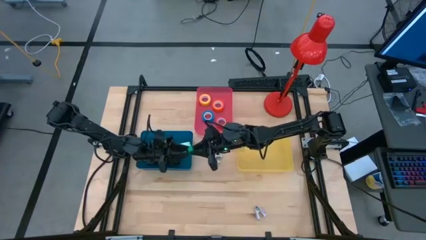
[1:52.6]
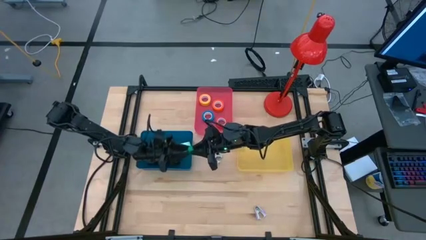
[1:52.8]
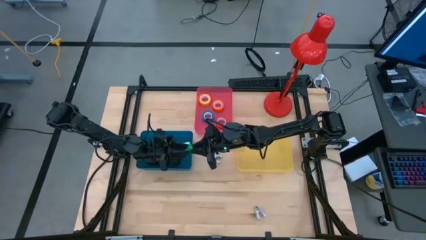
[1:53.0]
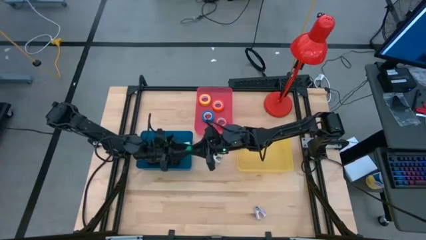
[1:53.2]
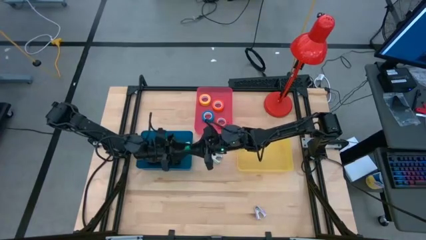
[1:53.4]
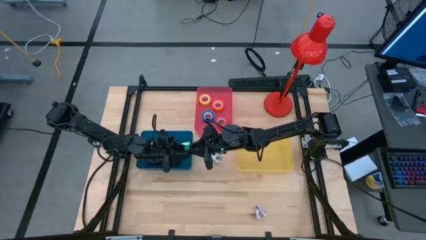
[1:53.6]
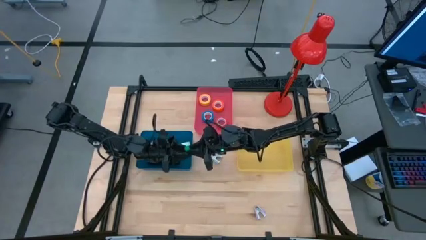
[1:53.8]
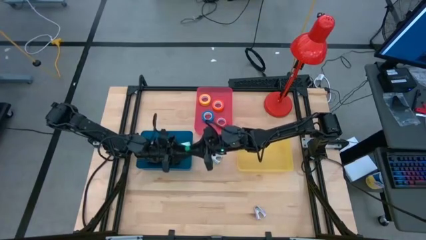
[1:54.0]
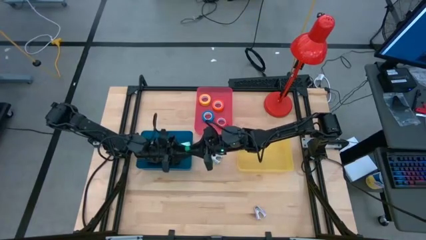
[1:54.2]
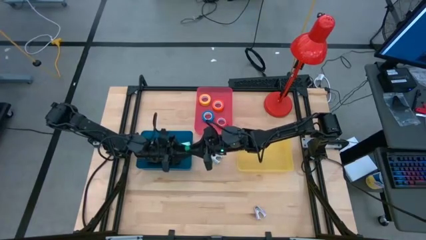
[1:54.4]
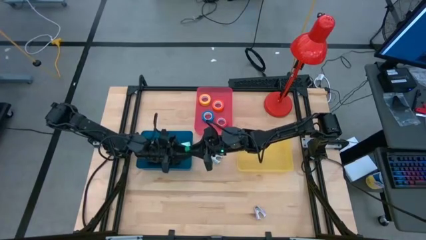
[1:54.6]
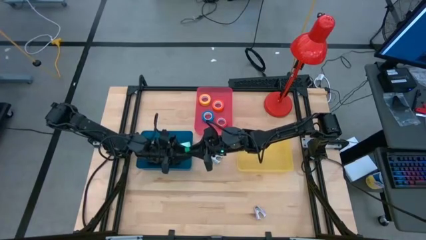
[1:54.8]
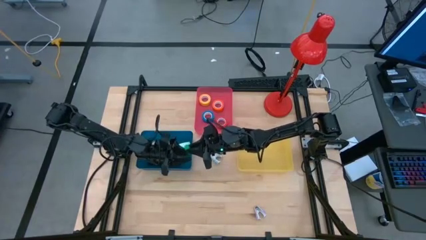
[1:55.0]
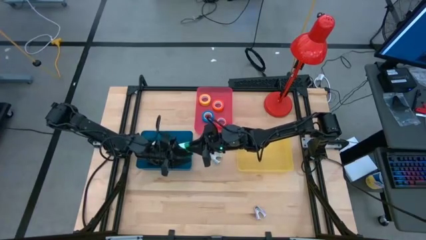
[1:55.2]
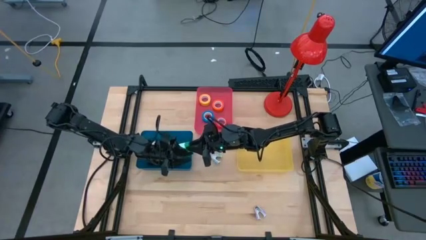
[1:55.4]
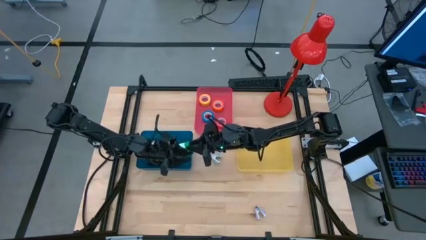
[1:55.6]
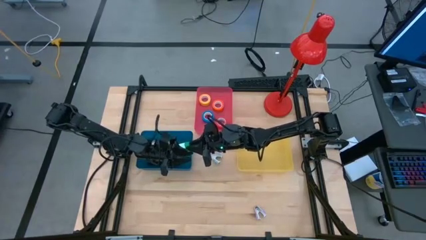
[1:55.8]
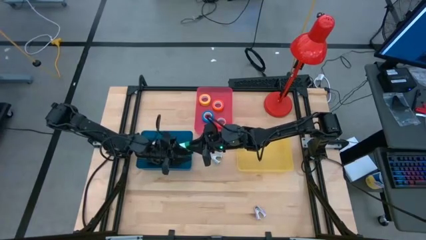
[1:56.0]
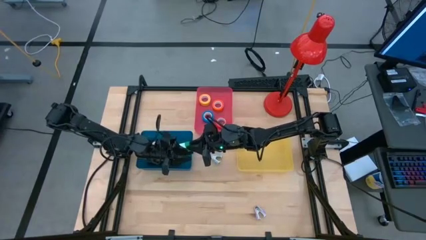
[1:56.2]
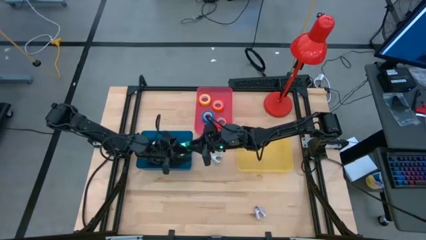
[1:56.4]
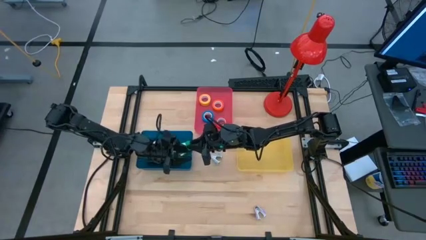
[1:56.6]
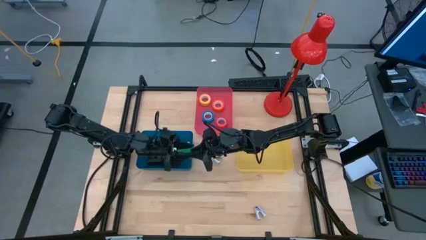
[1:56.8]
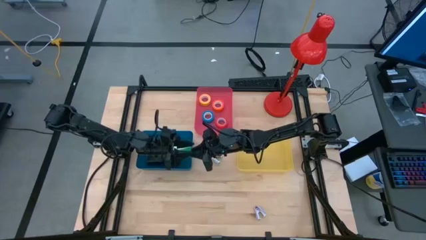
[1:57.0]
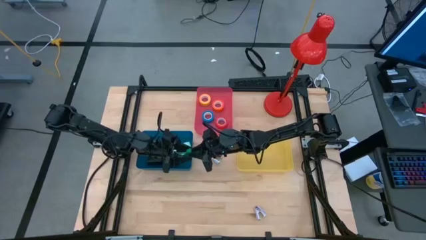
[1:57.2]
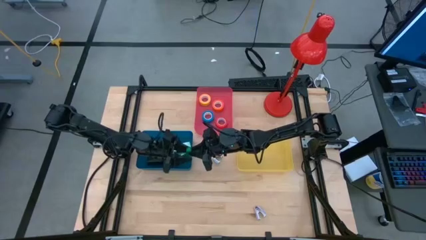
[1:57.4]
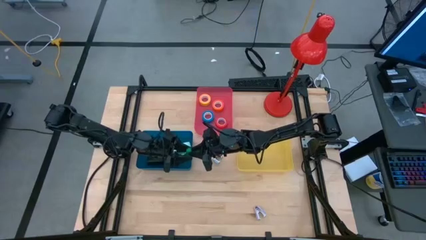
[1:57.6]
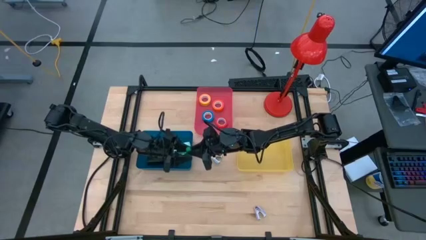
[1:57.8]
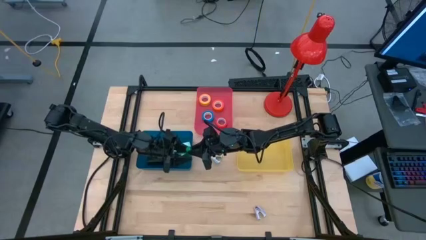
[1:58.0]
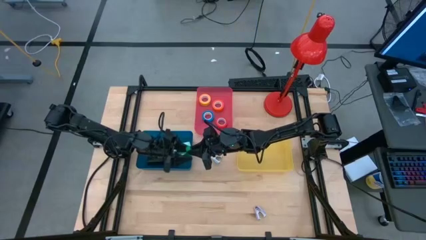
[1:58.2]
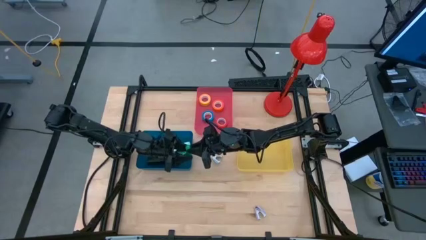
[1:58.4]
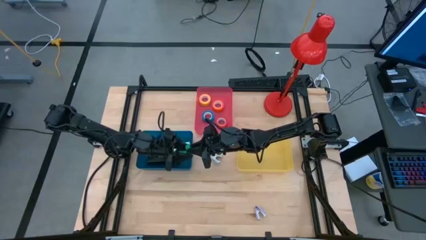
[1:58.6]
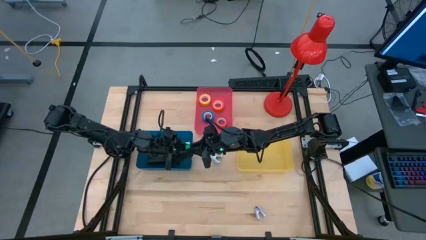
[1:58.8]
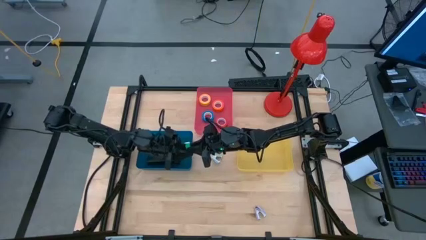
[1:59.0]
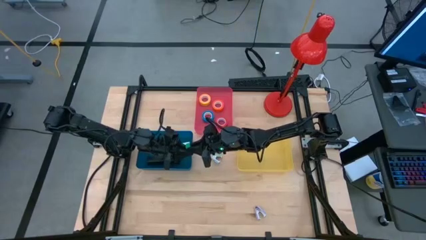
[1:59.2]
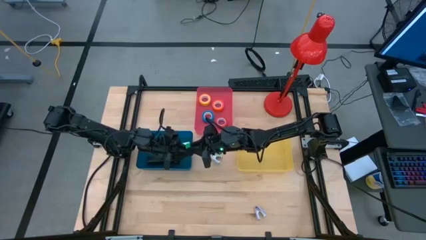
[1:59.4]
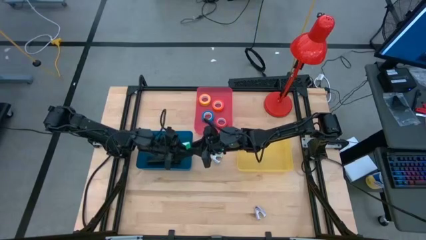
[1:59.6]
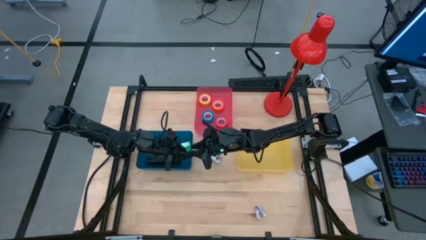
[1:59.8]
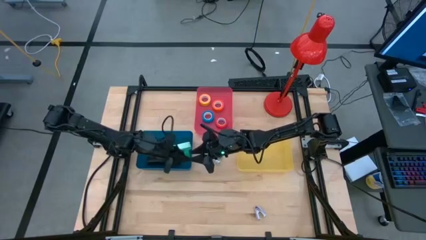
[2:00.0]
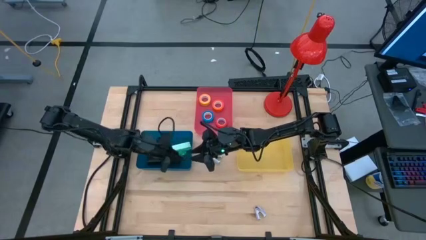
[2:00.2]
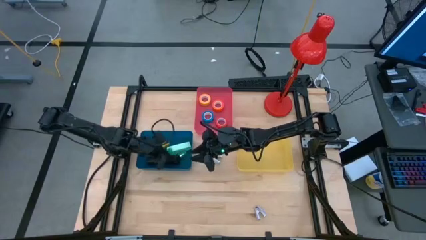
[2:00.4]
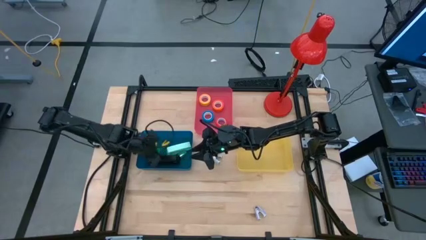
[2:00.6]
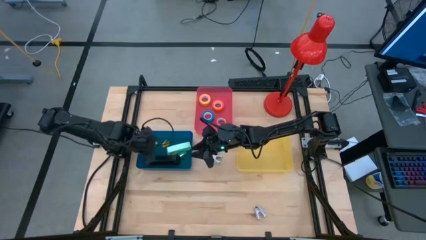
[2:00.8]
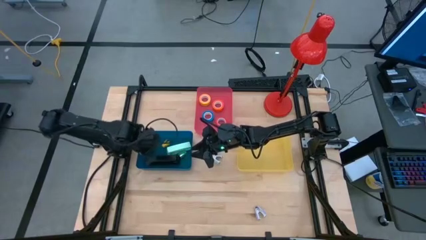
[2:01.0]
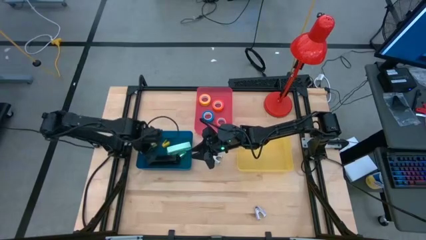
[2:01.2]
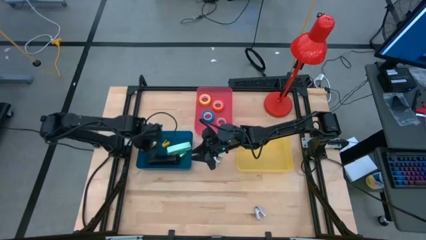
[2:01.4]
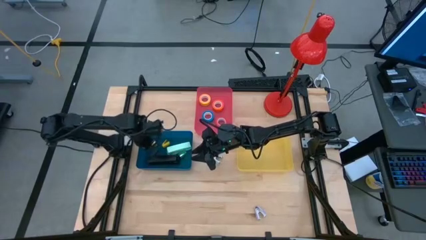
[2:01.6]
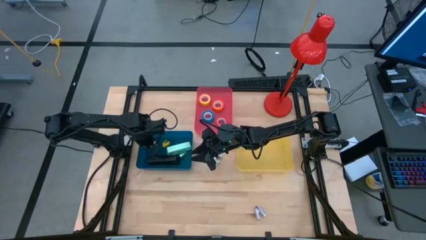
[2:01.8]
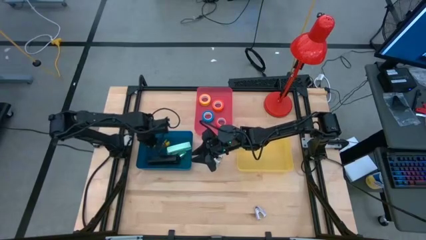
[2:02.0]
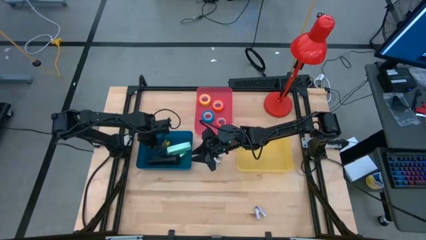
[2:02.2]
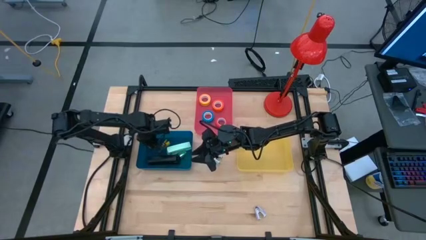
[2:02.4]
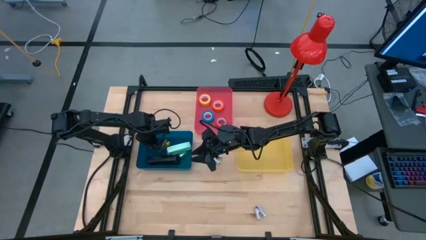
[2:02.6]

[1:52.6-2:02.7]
Task: Pick and place Stapler, Stapler remover, tape
Put the green stapler into the blue bin

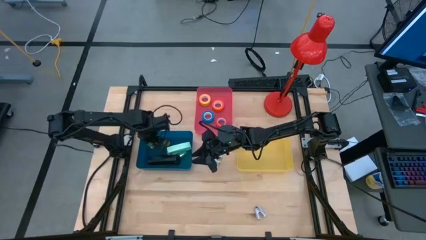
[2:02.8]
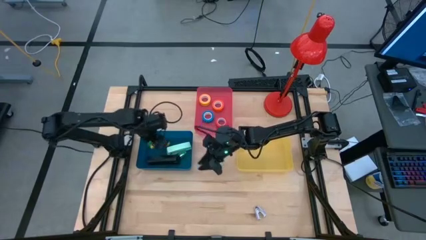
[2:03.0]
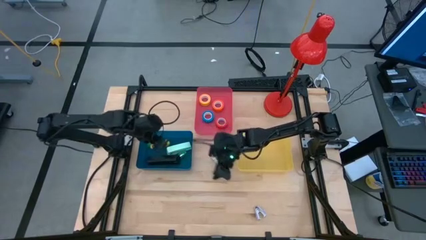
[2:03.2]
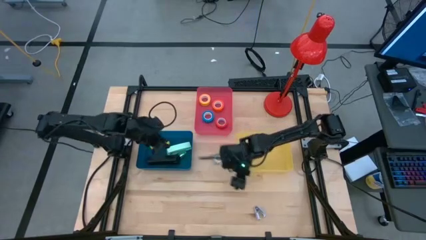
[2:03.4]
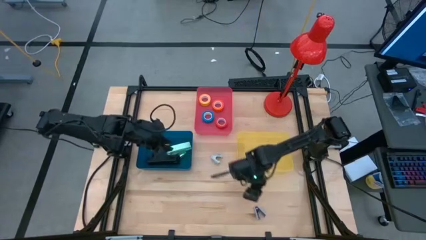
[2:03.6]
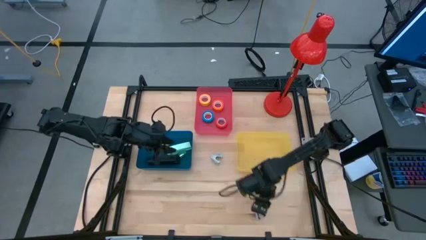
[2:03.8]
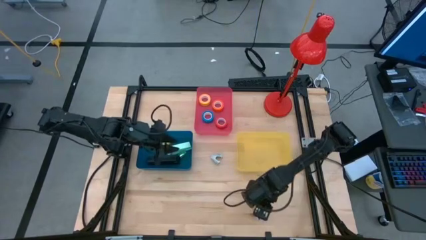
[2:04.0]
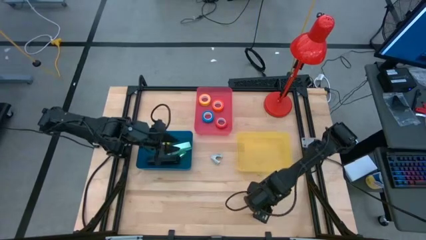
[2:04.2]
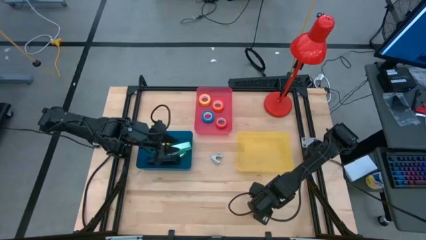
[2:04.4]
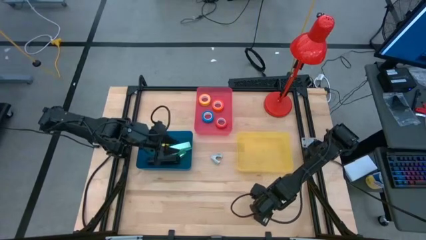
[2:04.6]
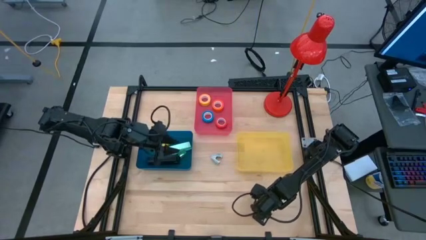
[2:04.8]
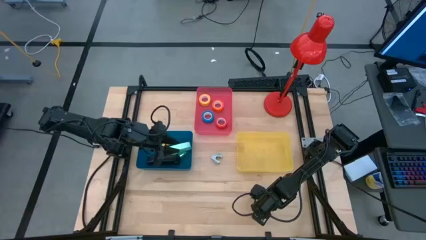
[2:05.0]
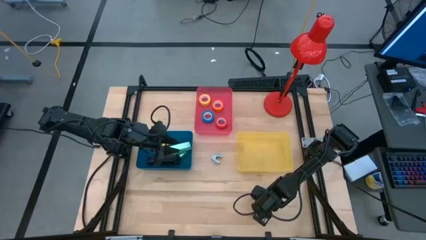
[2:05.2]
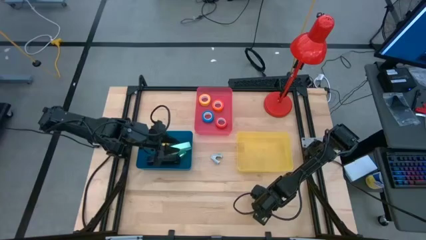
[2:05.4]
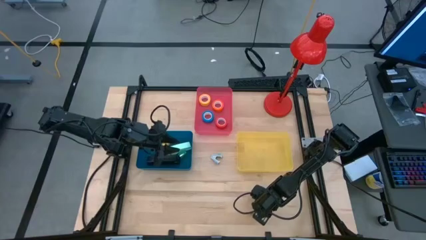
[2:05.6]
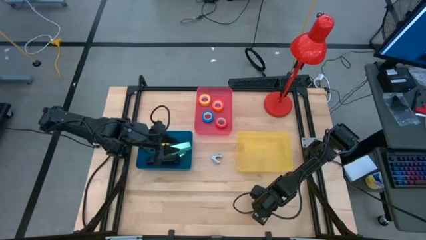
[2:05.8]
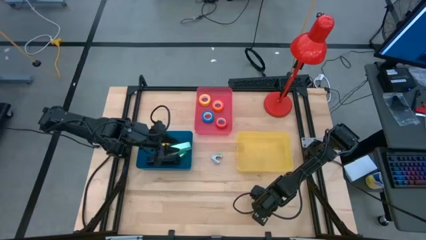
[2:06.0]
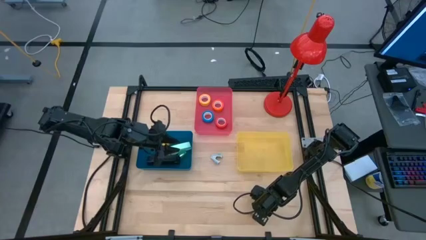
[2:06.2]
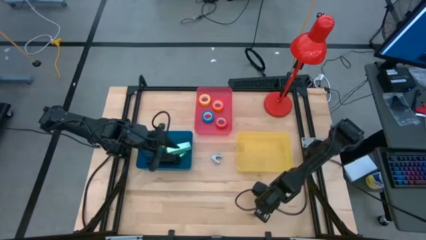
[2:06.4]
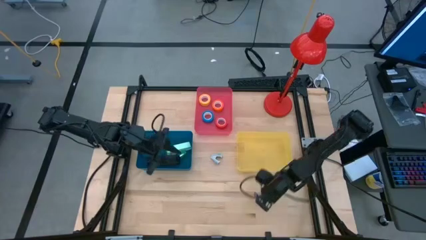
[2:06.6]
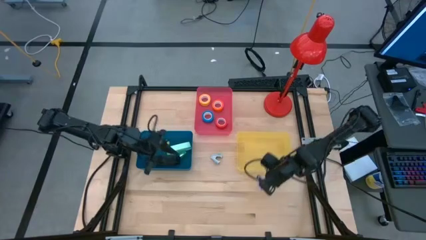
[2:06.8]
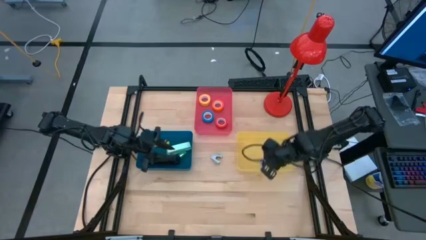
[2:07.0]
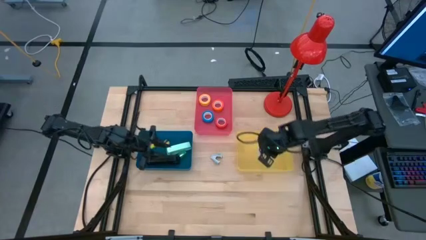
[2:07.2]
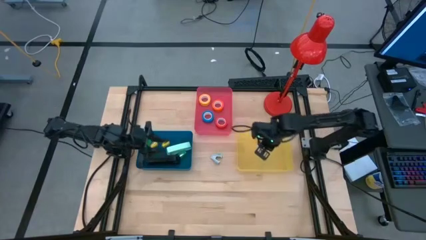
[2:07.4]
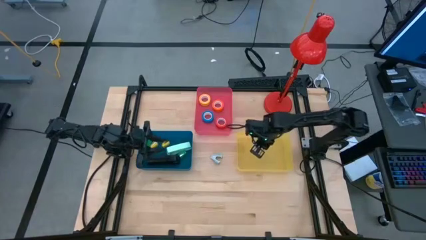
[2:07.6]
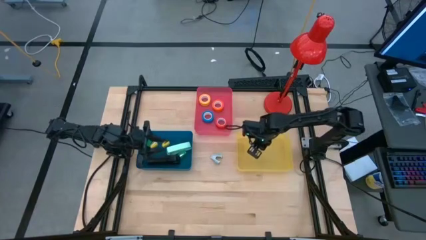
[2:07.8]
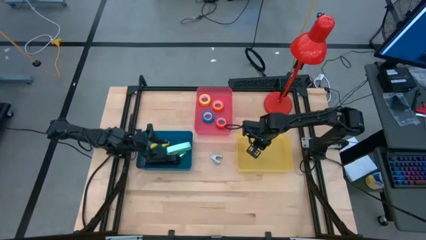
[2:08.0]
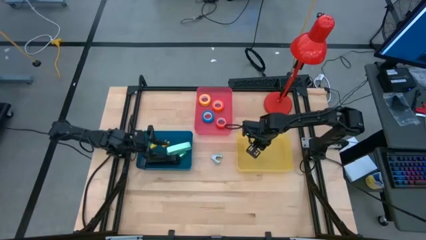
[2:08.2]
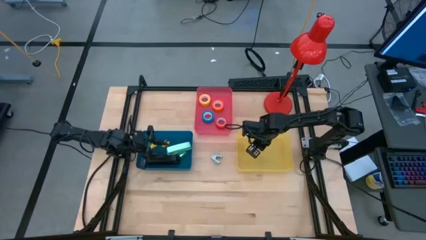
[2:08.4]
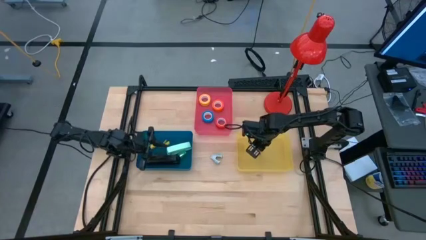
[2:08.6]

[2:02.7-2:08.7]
Put the purple staple remover into the yellow bin
